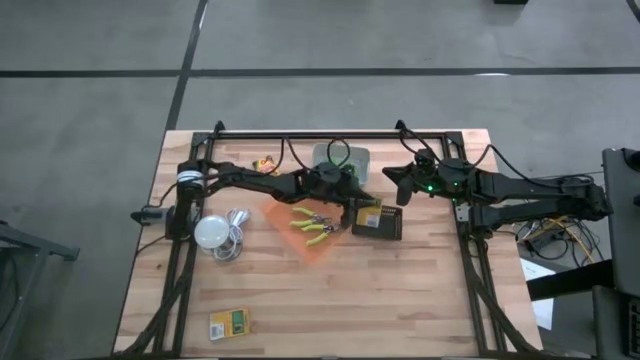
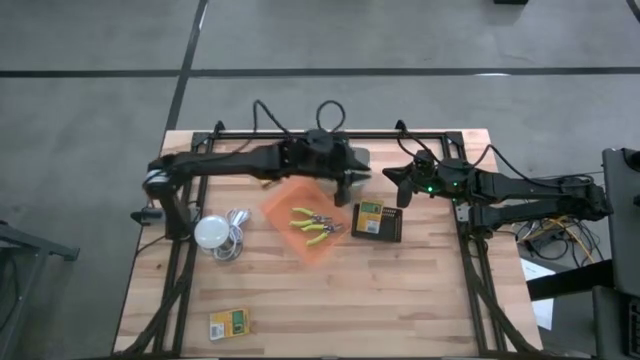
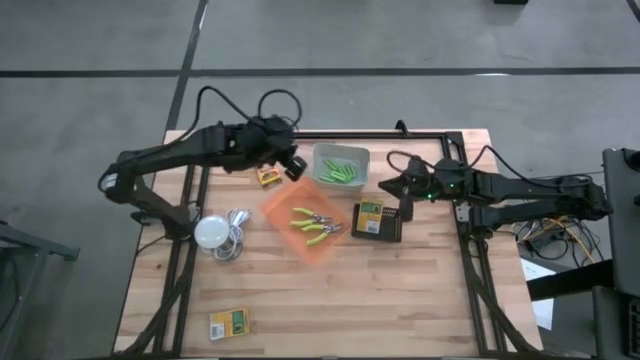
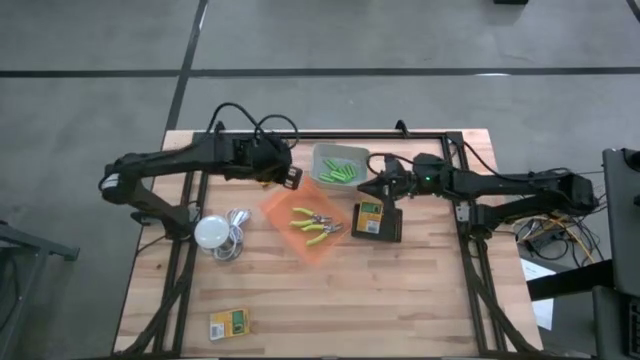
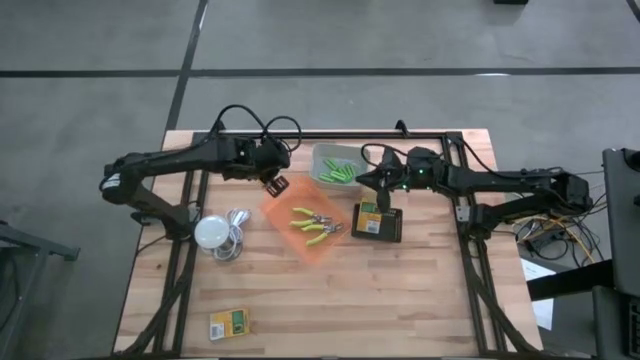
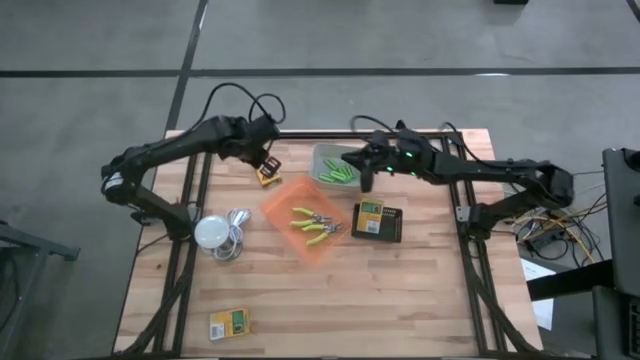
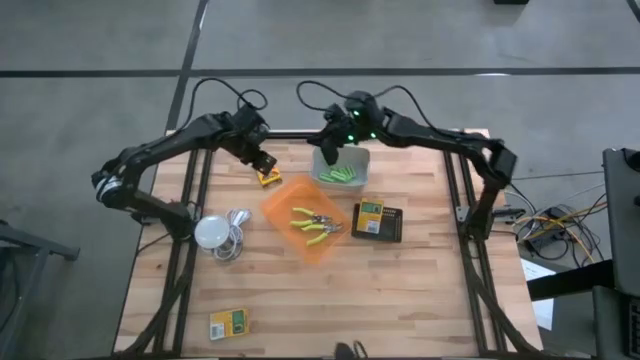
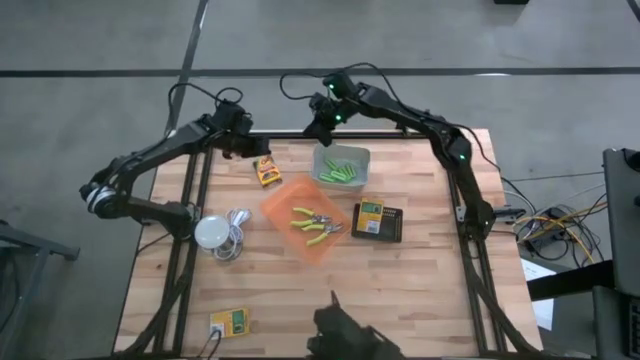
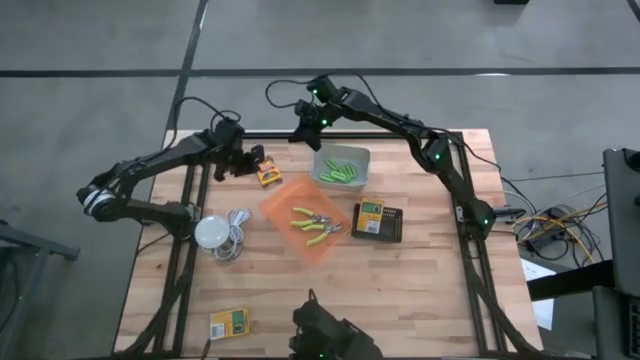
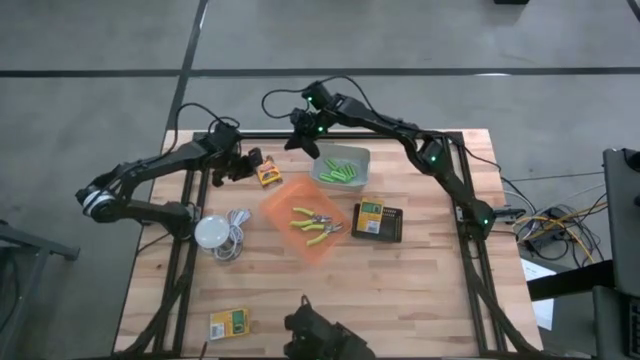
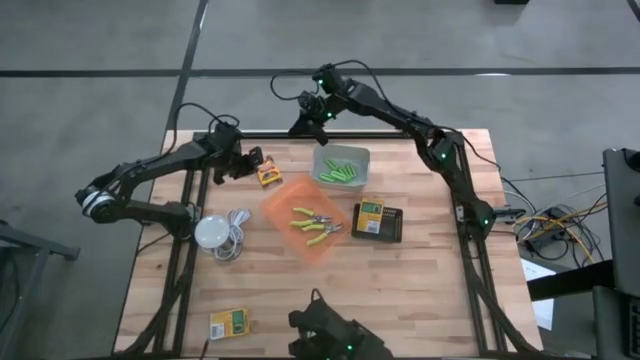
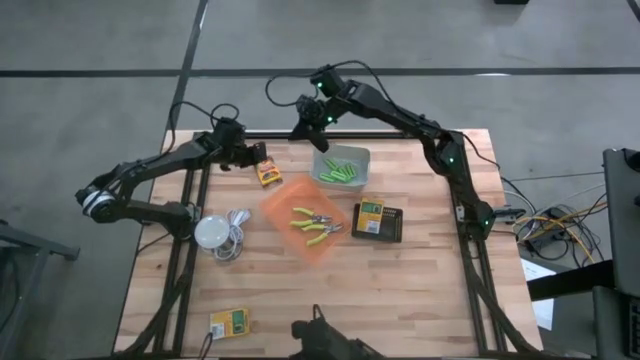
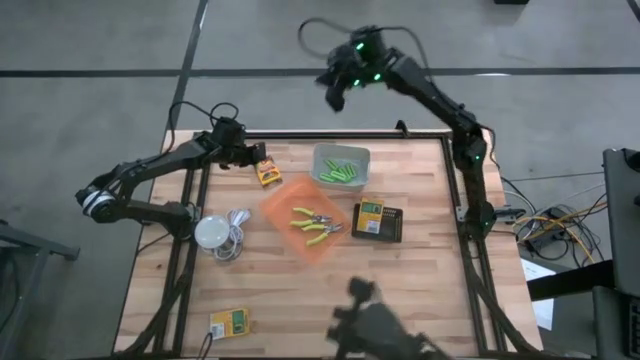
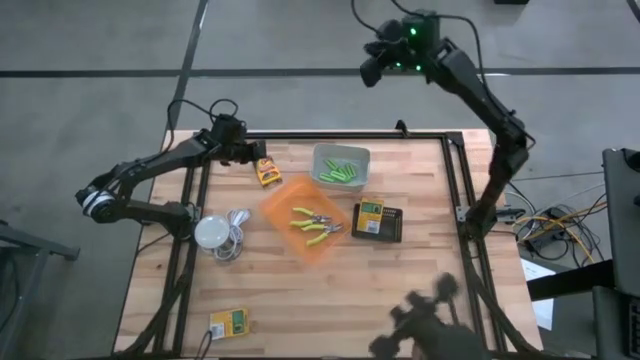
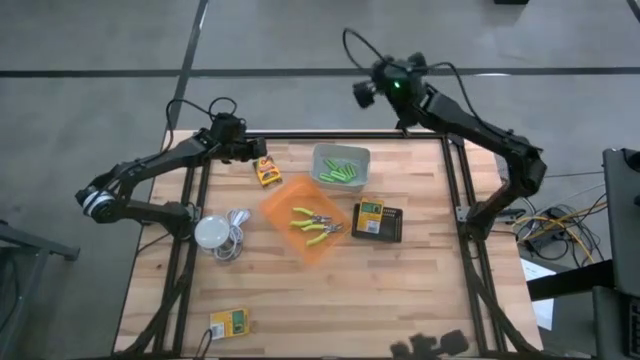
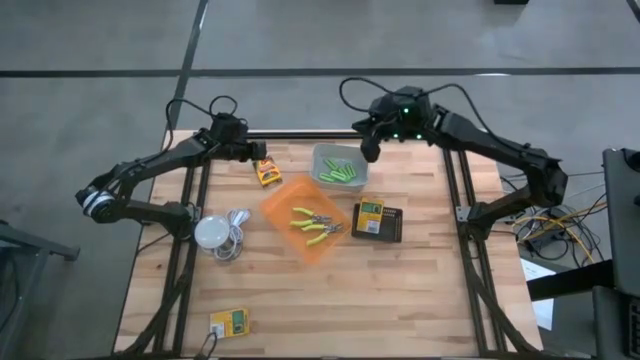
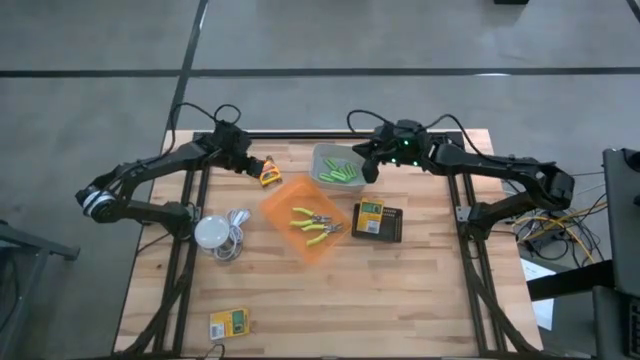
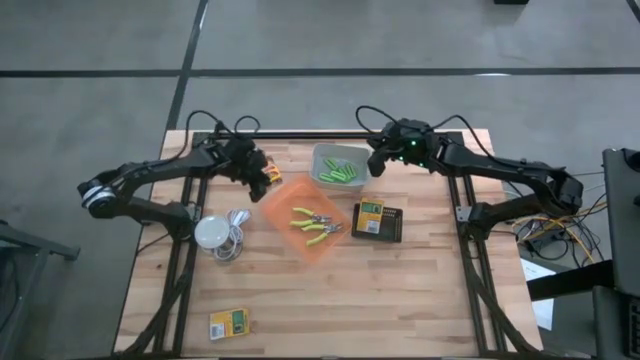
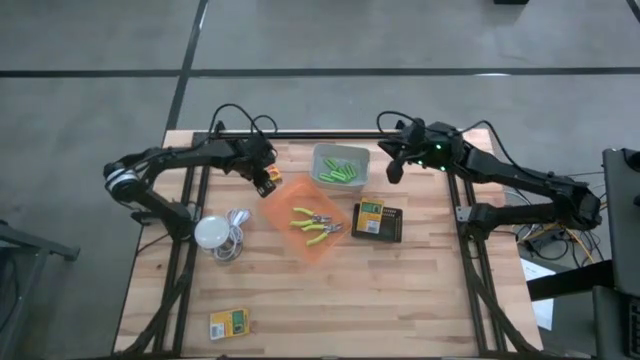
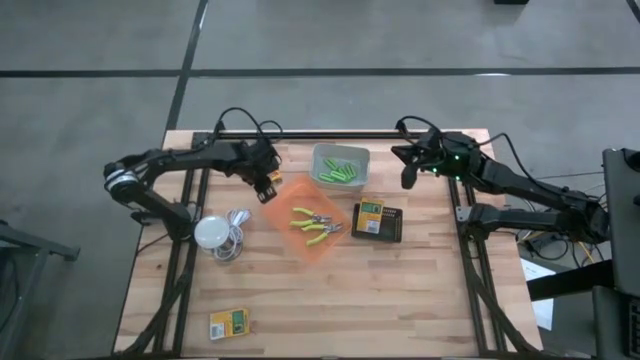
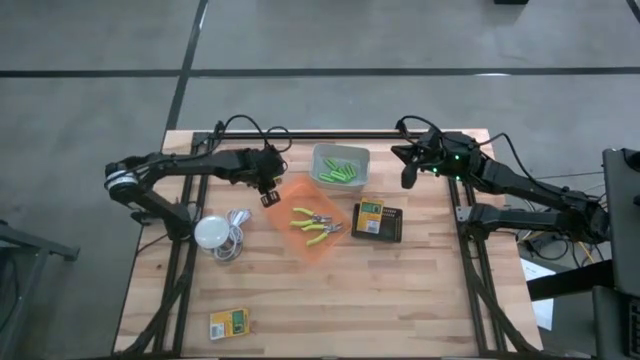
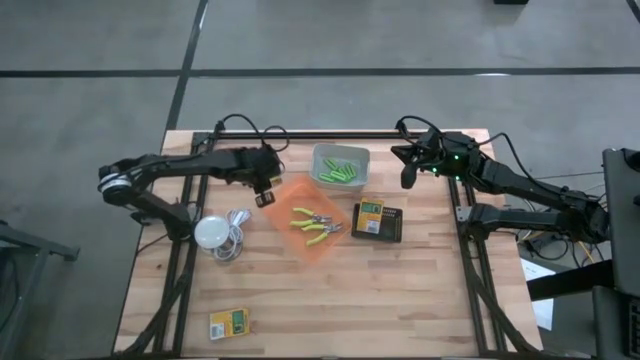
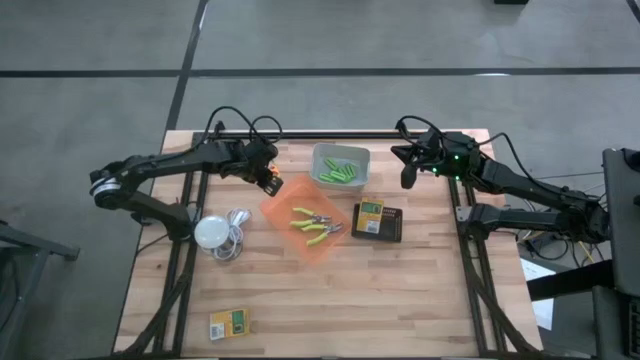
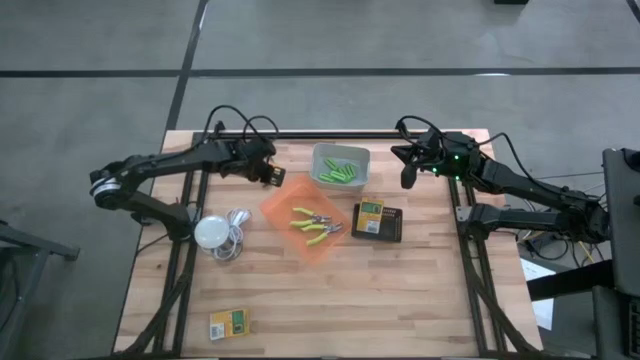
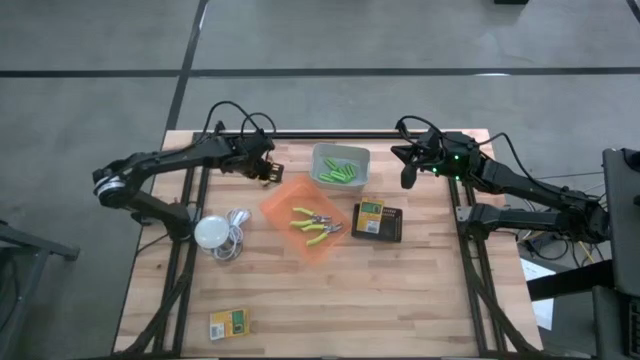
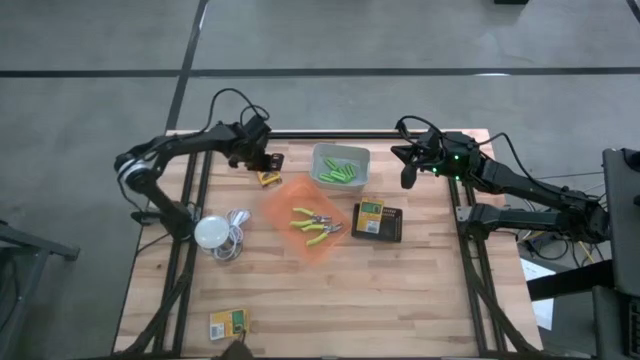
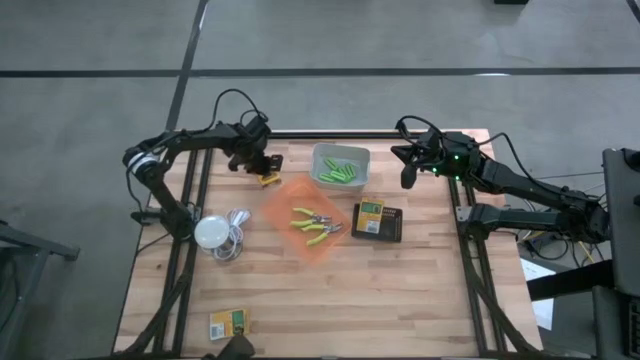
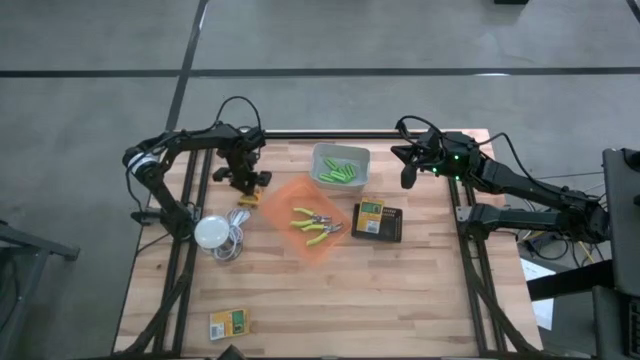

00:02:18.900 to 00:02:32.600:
Task: Pick & Place School Supplies
Adjust the yellow crayon box

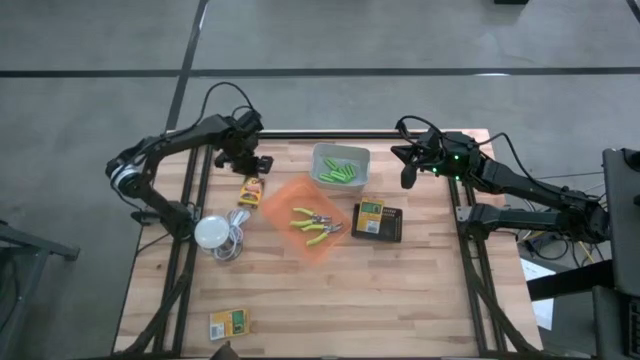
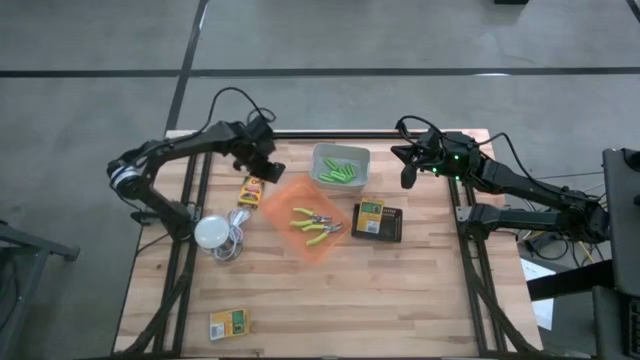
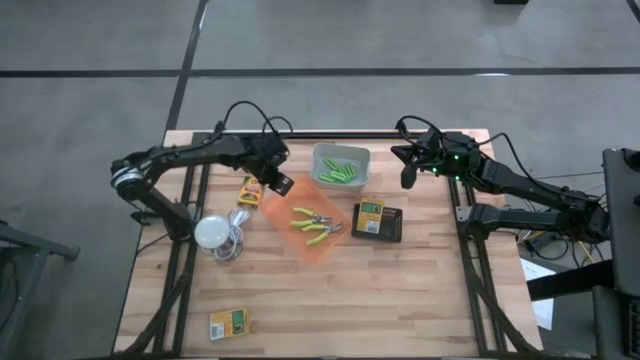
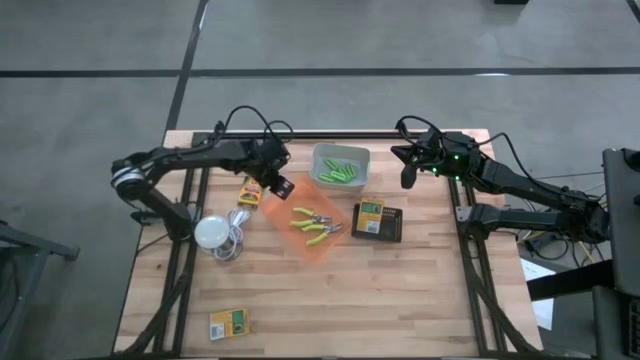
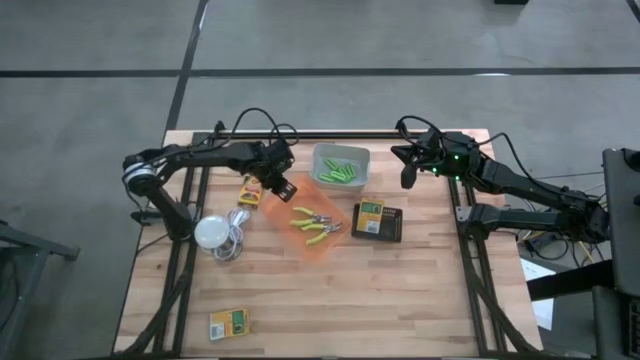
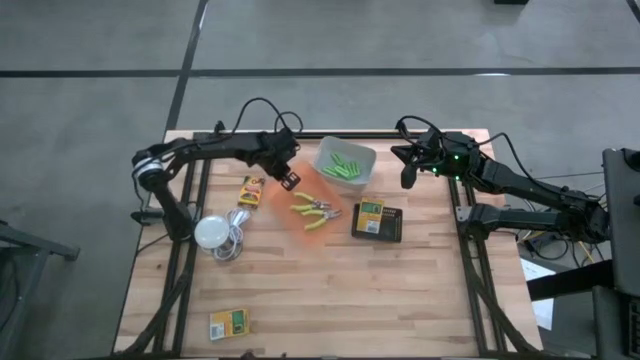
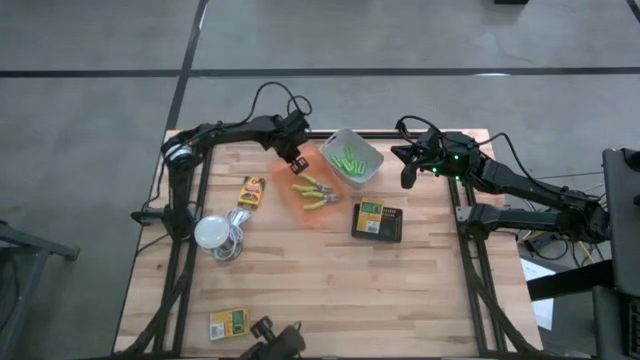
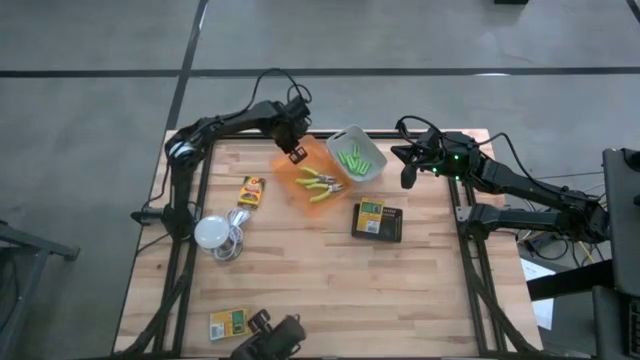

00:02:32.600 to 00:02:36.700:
Adjust the orange bin

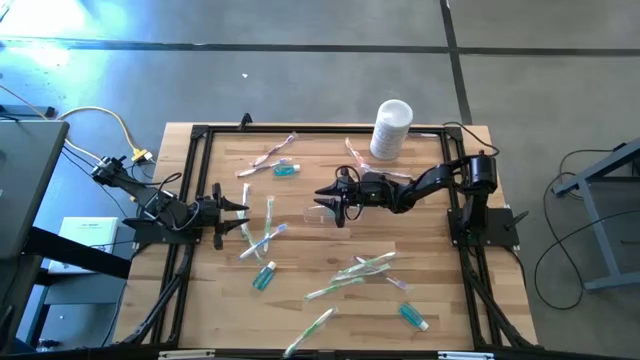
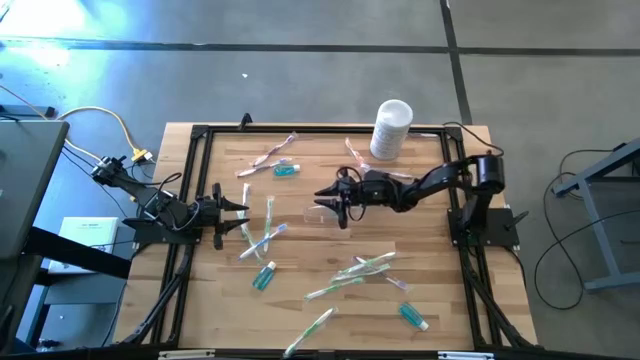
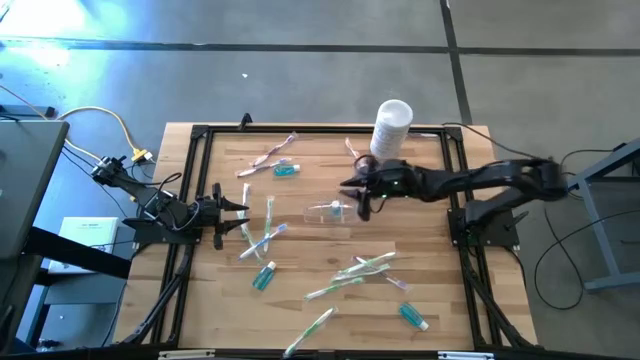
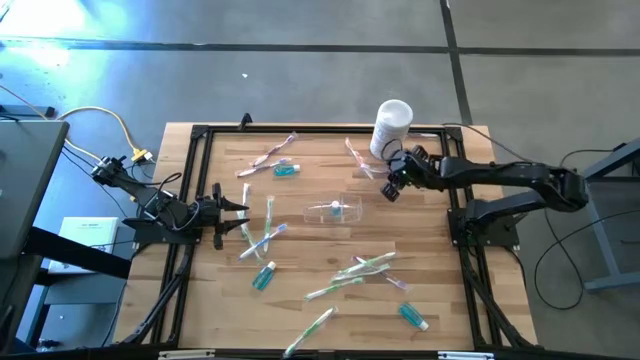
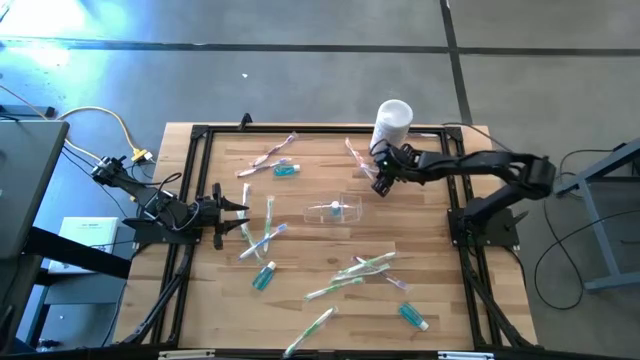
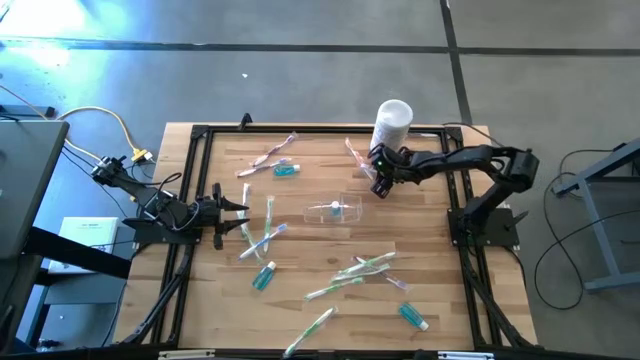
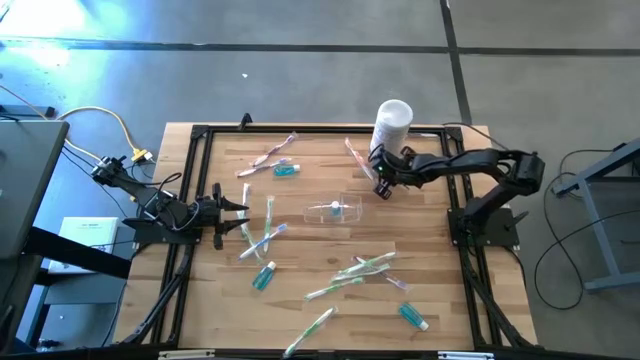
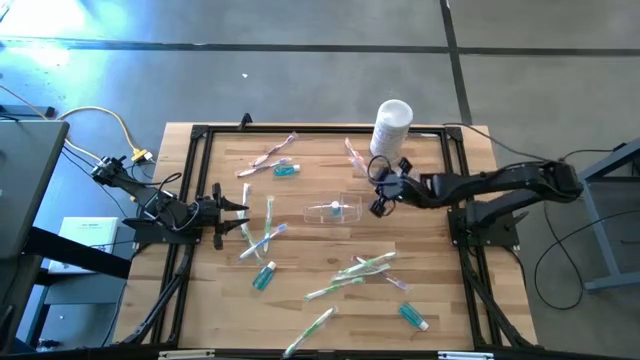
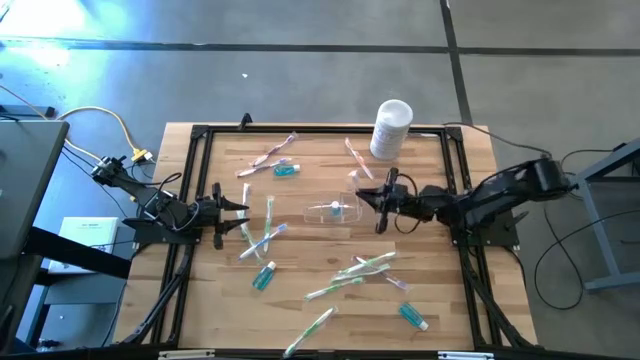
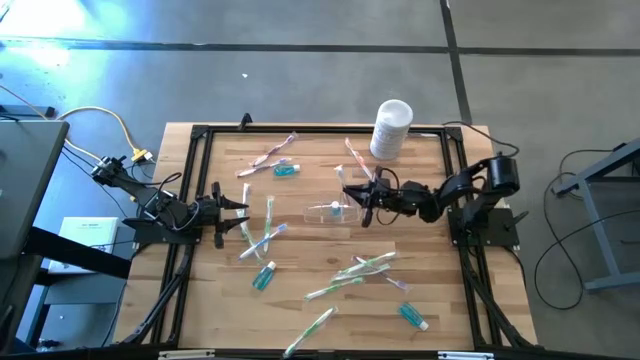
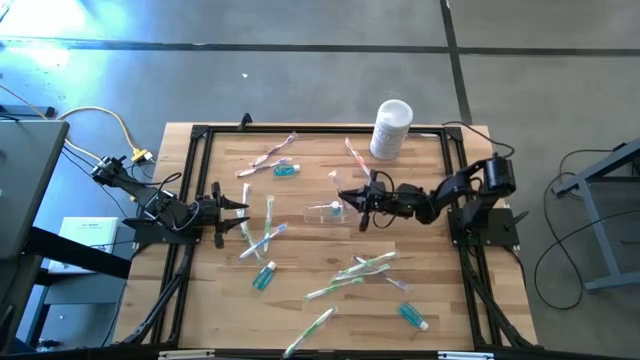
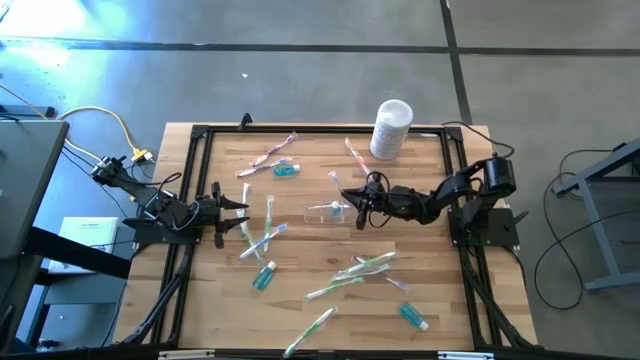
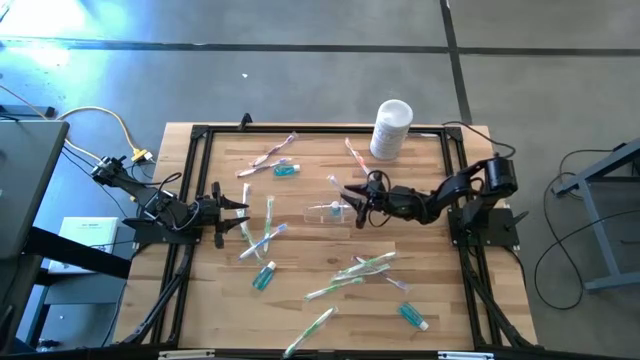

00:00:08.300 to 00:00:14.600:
Task: Pick & Place toothbrushing station
Put the violet toothbrush into the transparent organizer
